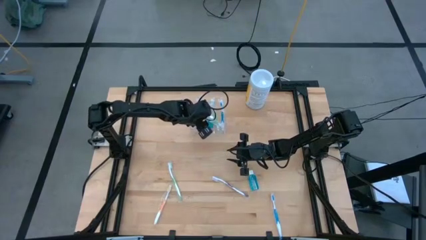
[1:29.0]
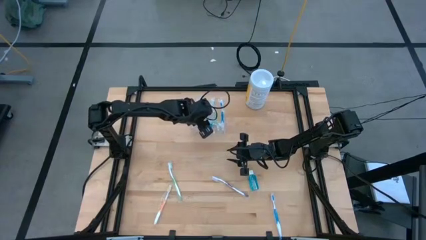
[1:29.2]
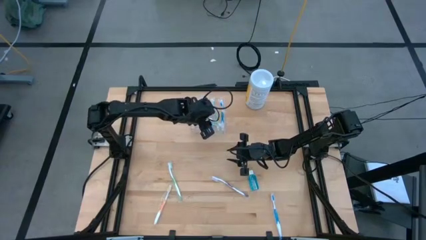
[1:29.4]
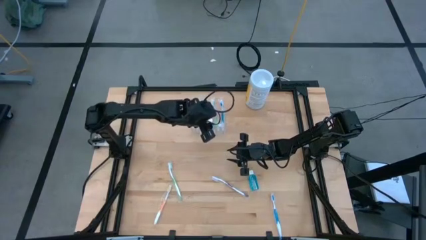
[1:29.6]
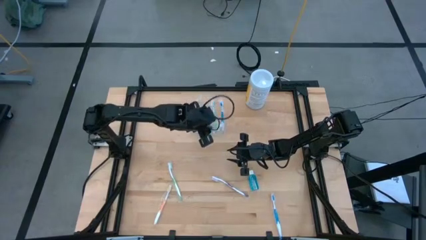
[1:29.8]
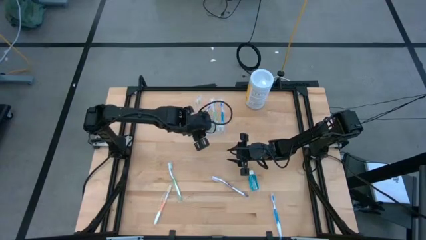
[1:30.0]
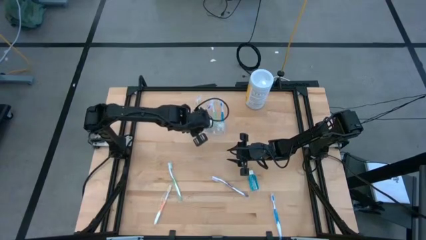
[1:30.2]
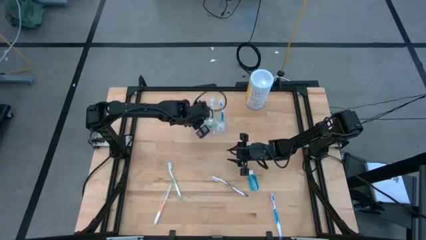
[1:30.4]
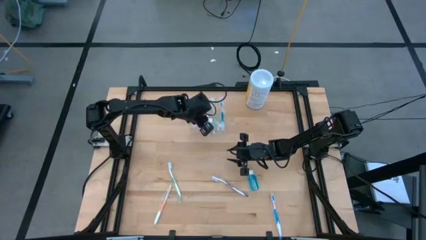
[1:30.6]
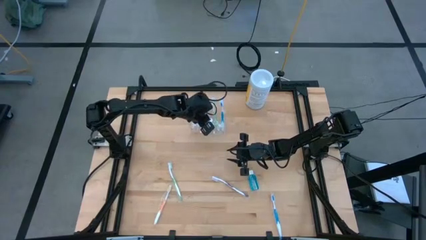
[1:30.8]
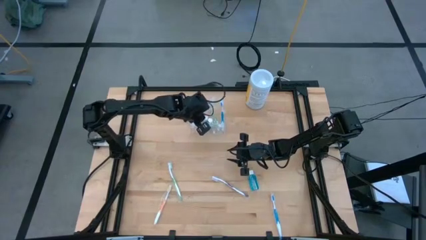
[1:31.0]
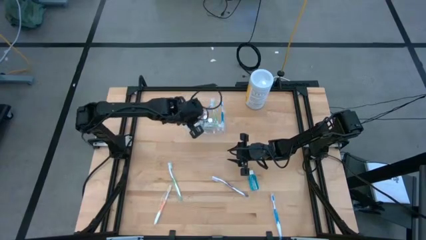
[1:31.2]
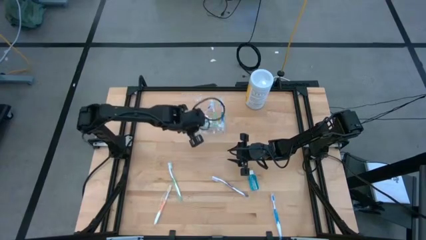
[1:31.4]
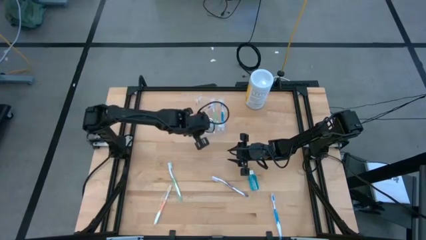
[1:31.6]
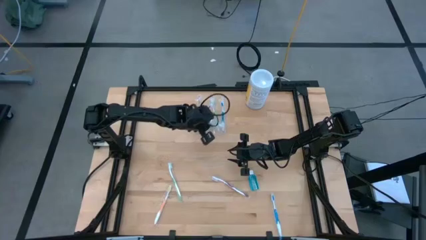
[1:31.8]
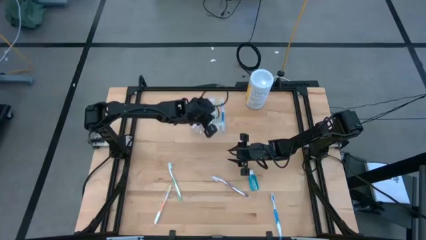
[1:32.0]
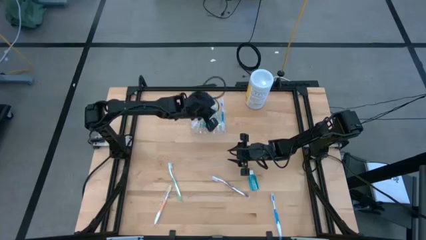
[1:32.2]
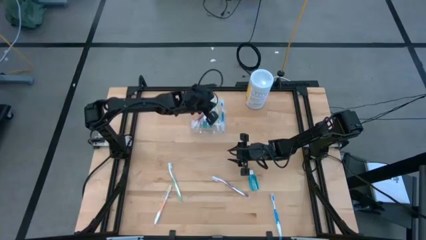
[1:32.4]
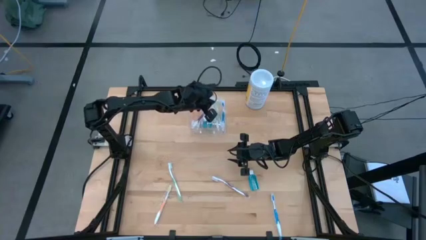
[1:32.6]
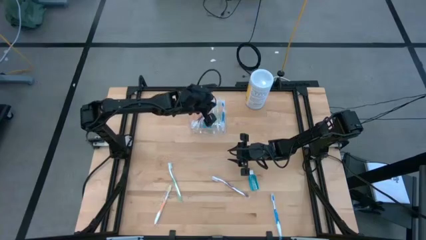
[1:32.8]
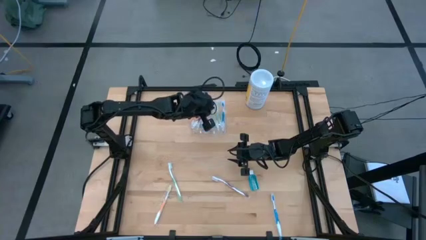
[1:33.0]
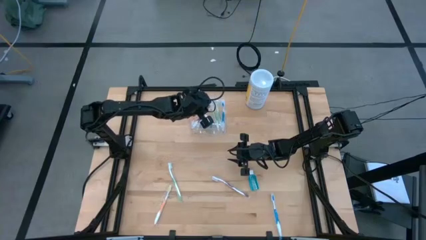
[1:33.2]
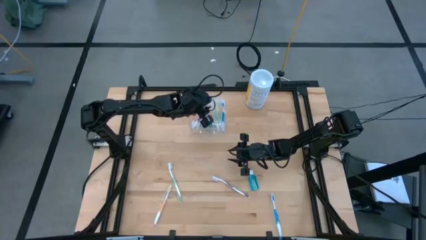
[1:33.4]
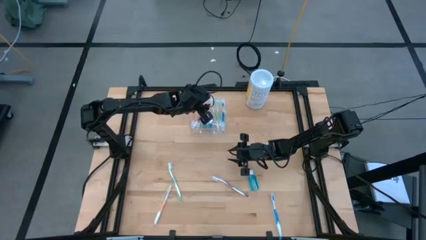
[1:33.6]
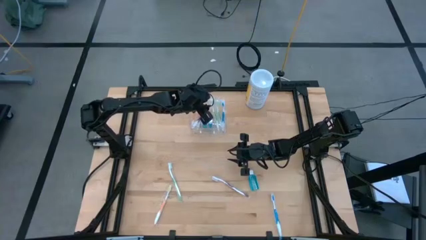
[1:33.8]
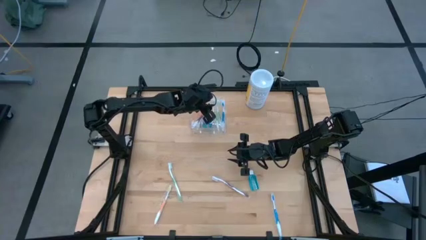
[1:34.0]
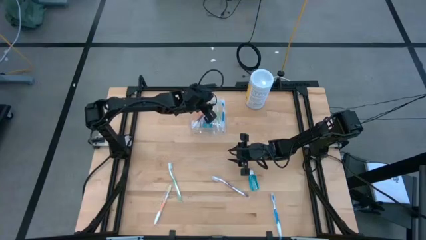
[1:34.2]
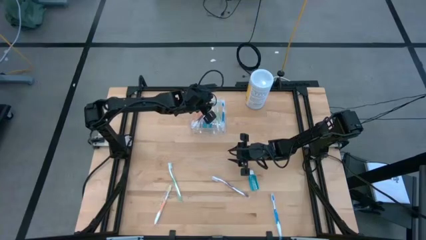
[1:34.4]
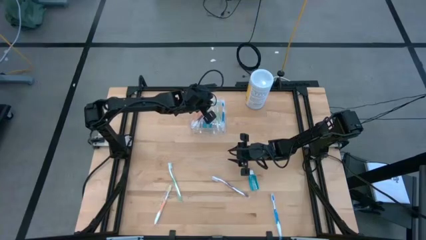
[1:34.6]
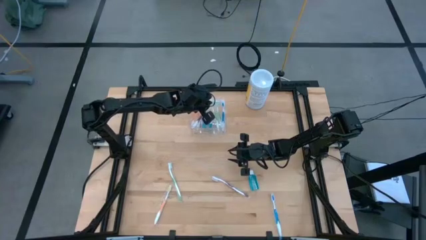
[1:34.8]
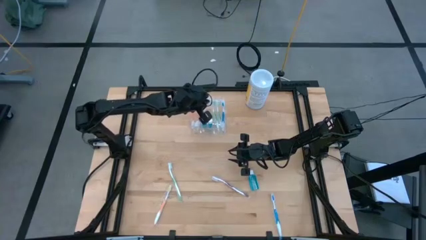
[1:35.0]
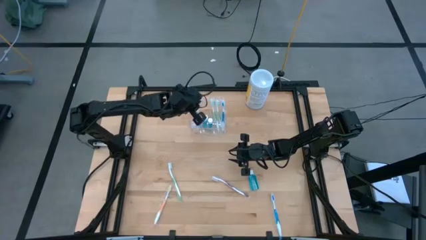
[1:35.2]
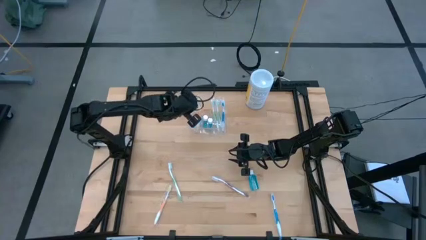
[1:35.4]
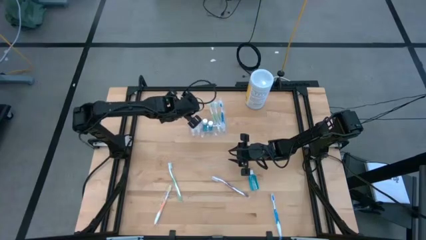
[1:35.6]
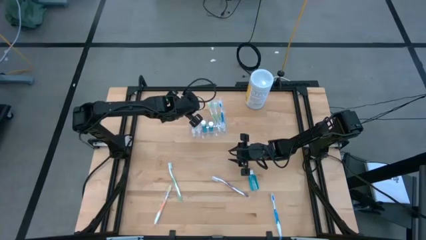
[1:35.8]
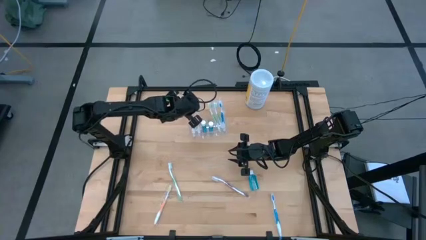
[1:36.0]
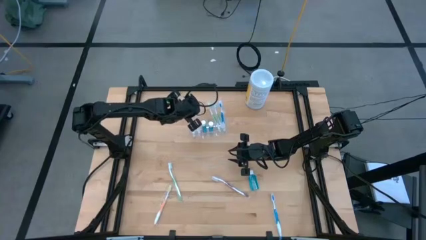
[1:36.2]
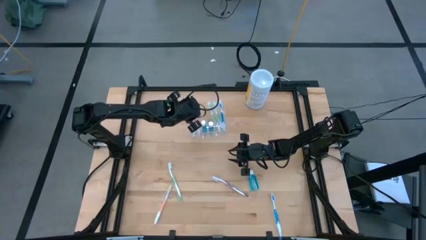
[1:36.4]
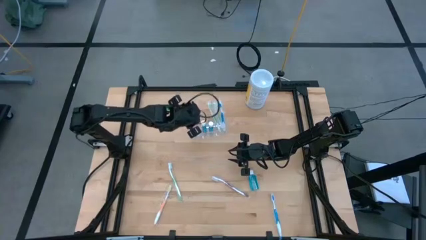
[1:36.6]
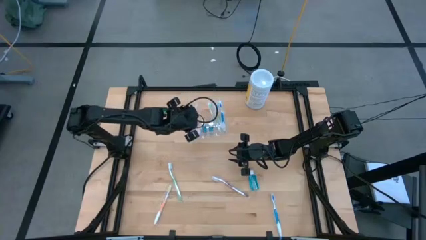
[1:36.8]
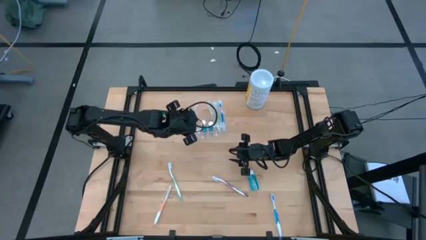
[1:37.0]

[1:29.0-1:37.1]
Task: Pick & Place toothbrushing station
Adjust the toothbrushes in the transparent organizer

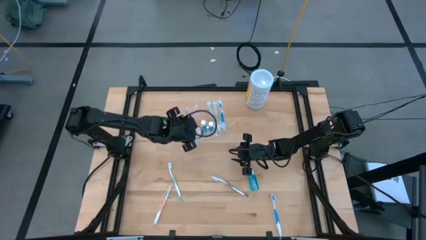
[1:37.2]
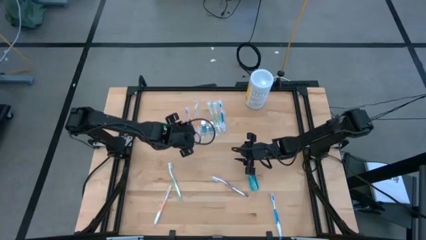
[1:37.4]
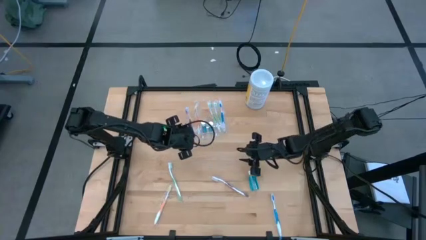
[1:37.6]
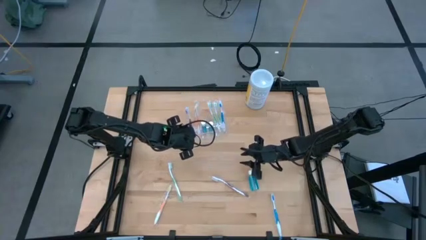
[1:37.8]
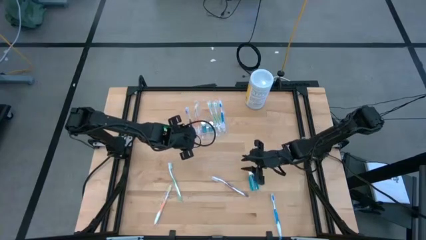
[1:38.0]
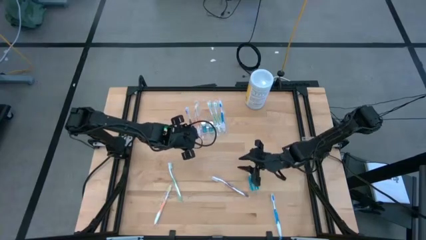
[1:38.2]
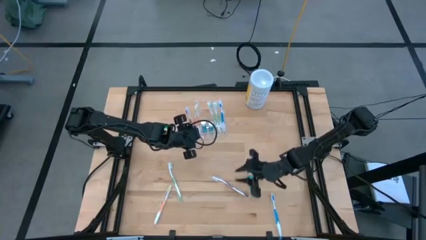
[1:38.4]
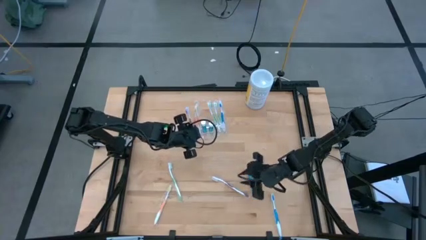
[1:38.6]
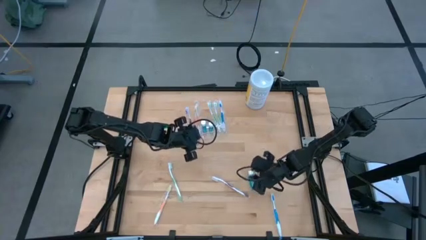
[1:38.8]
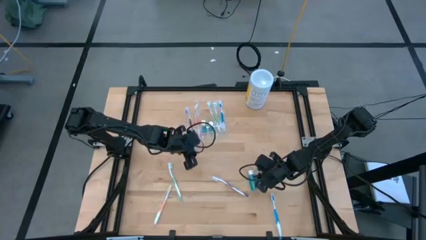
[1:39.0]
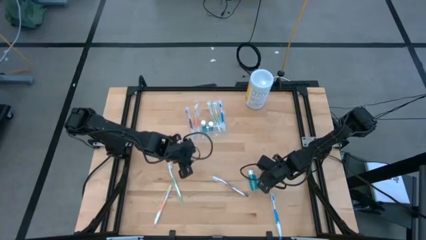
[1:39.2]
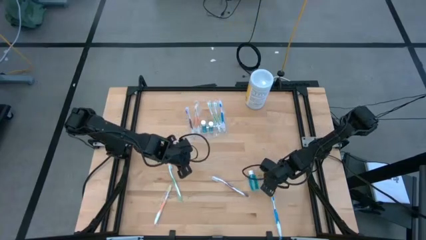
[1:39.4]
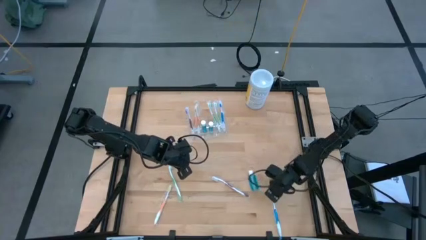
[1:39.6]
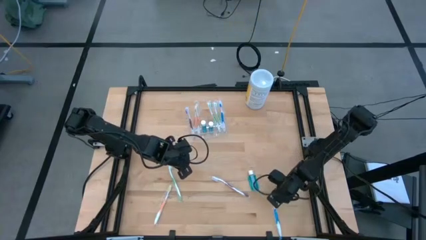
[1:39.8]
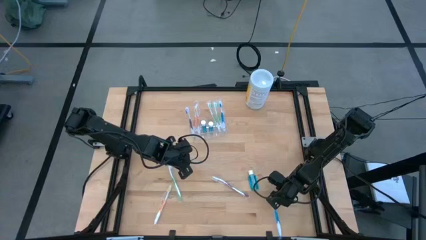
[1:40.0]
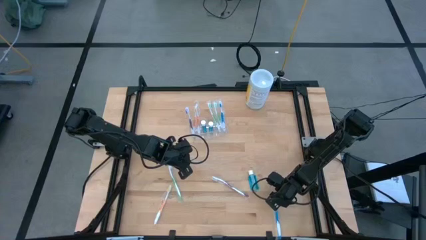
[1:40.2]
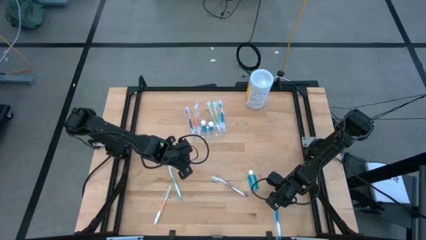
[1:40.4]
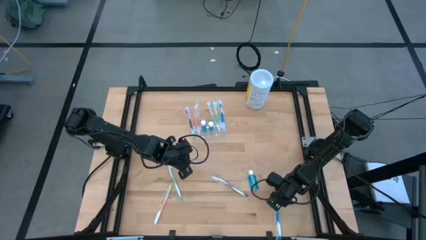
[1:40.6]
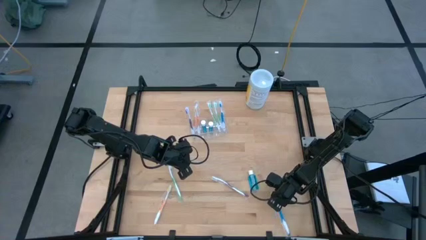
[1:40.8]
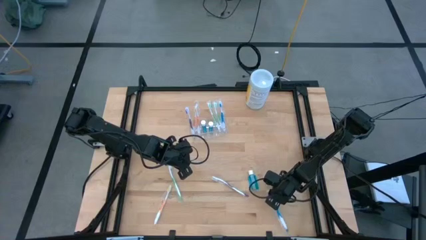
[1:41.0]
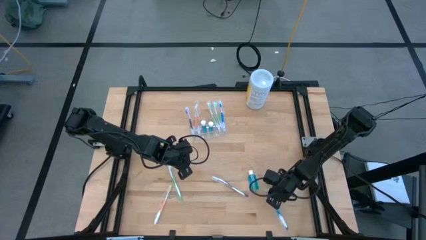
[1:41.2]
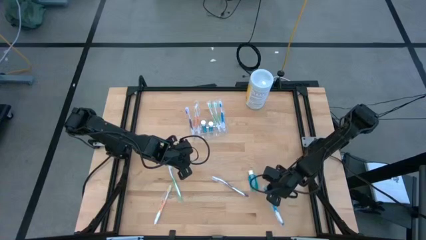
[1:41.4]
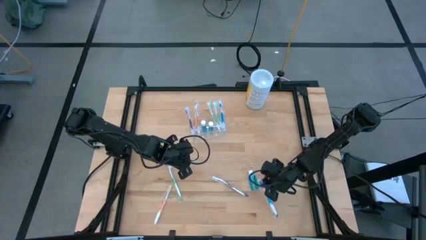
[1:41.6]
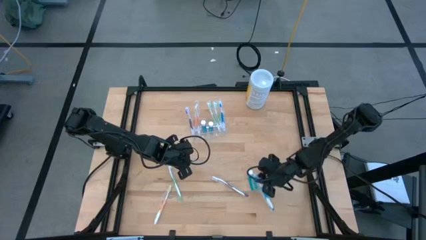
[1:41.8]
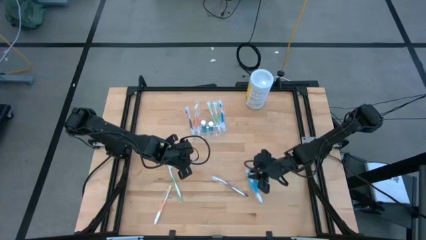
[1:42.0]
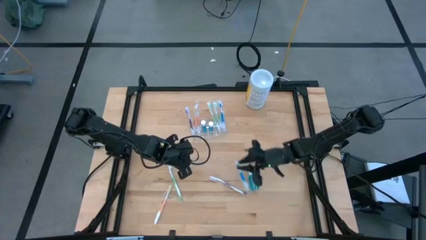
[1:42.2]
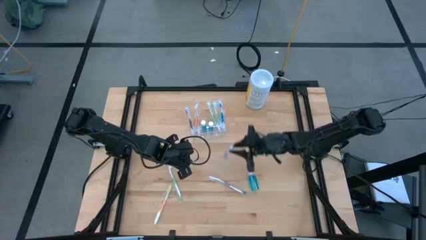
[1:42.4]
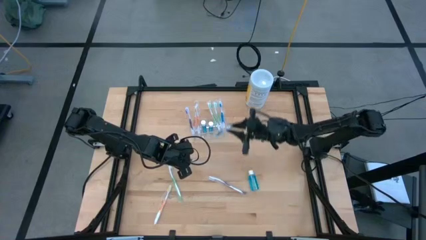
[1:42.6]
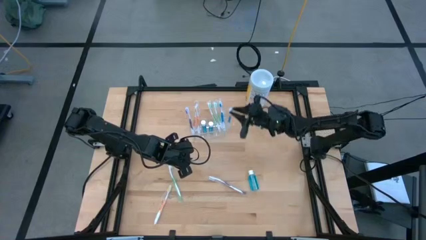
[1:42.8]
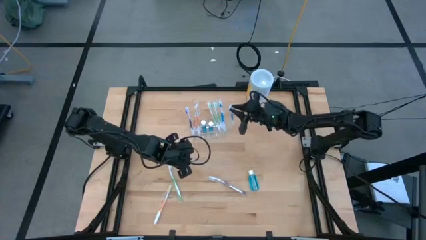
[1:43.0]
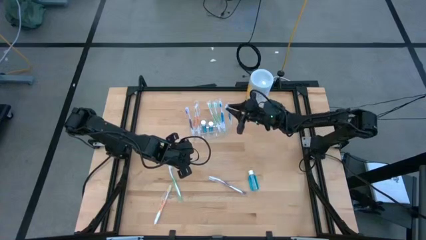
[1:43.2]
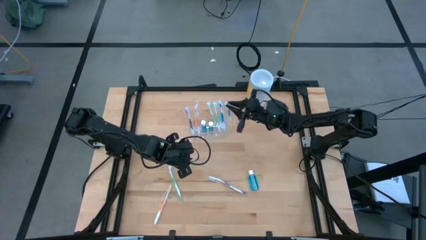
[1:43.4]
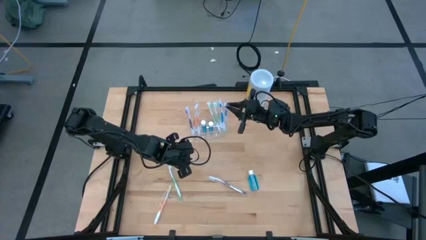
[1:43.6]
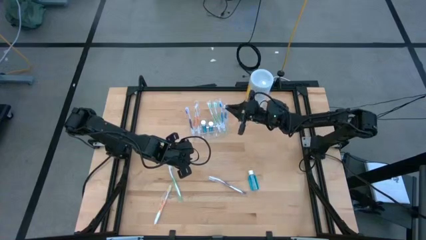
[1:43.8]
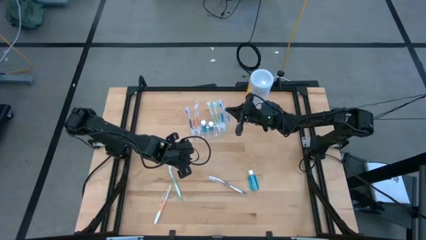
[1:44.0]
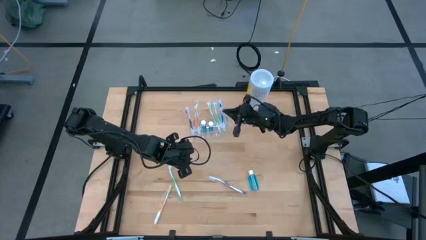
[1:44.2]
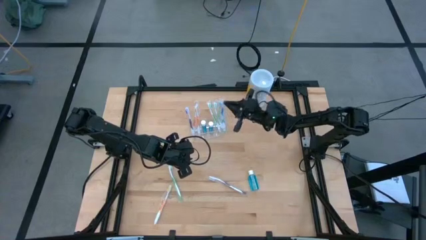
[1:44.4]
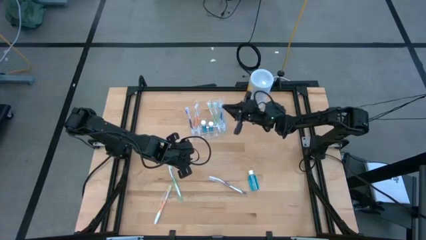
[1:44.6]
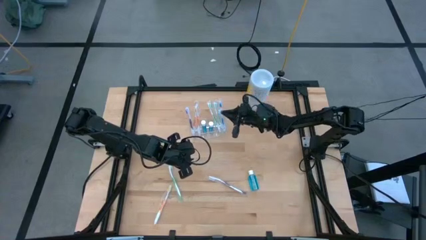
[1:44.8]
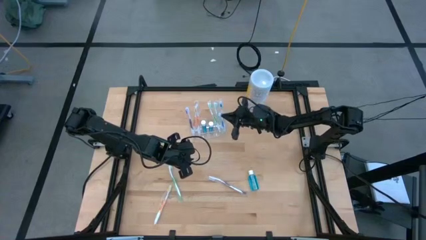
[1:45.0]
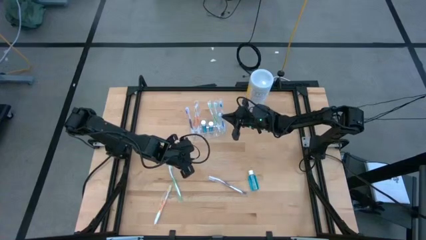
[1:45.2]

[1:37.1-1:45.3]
Put the blue toothbrush into the transparent organizer
